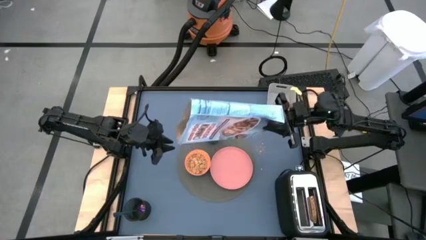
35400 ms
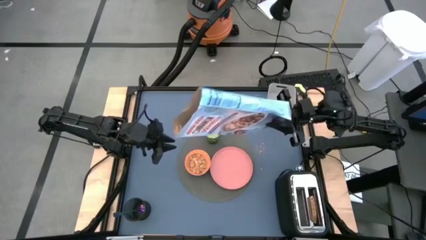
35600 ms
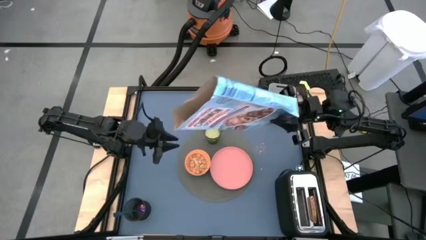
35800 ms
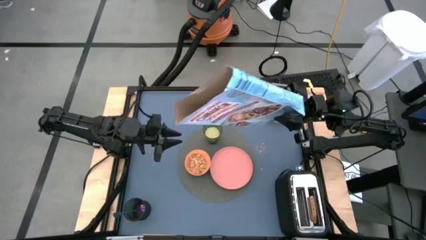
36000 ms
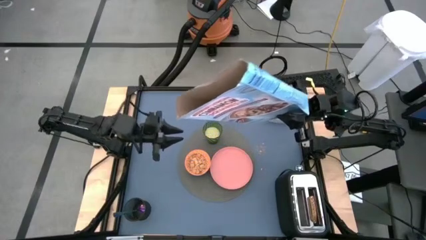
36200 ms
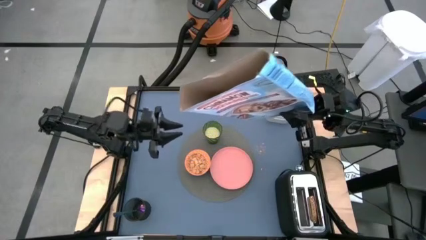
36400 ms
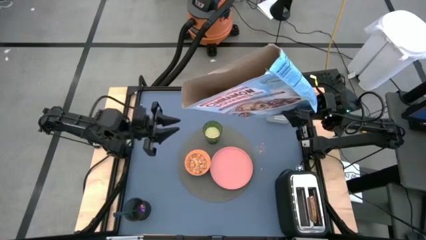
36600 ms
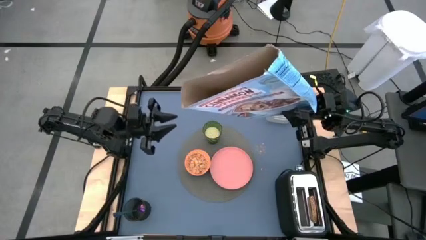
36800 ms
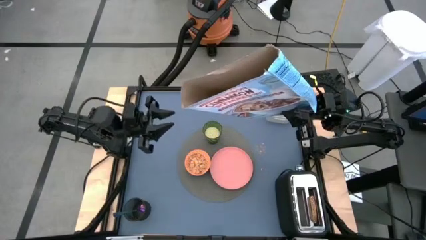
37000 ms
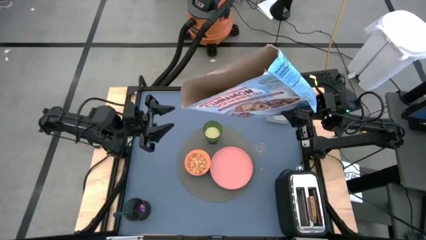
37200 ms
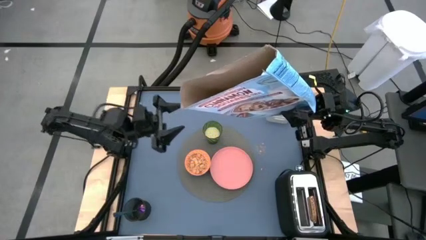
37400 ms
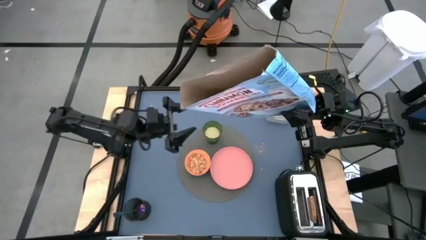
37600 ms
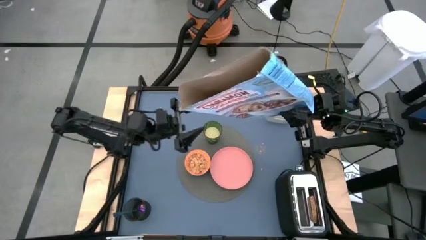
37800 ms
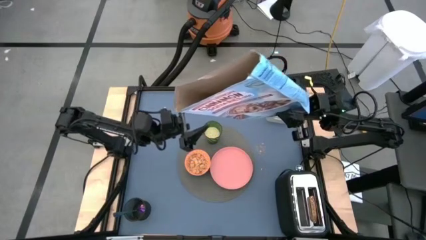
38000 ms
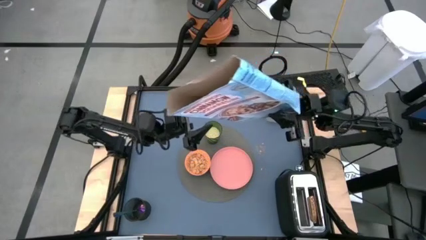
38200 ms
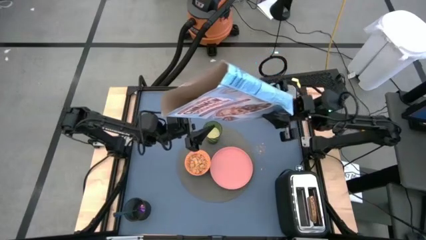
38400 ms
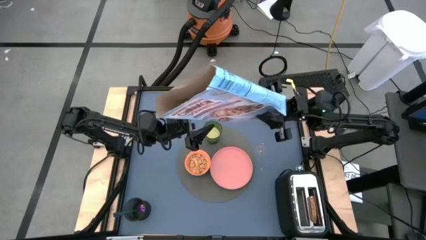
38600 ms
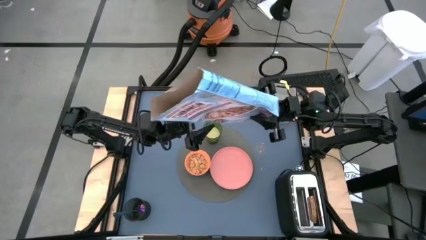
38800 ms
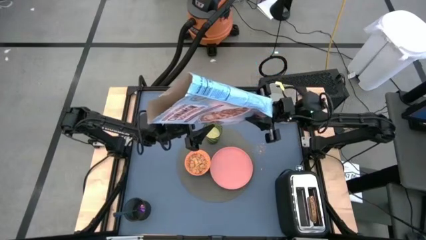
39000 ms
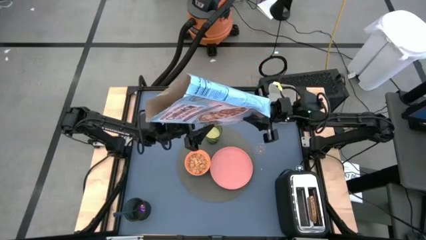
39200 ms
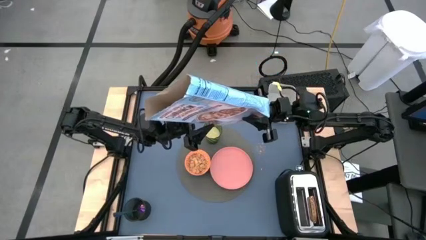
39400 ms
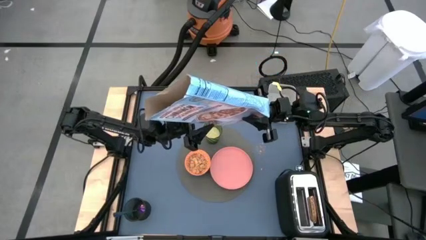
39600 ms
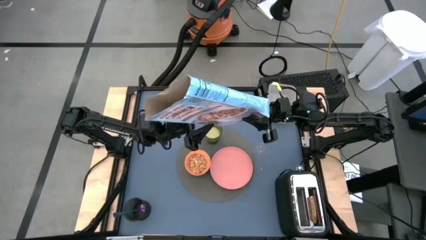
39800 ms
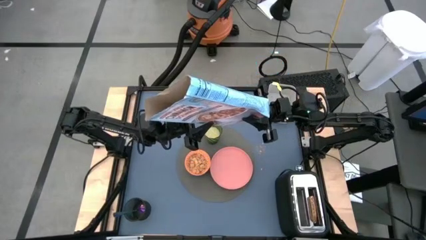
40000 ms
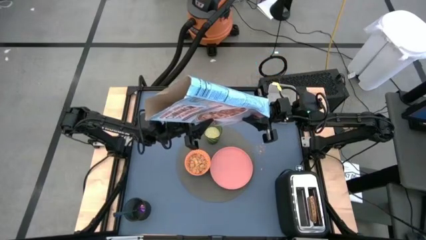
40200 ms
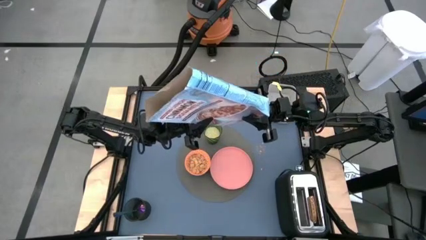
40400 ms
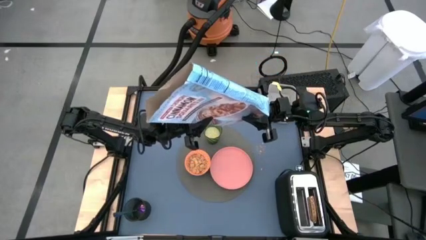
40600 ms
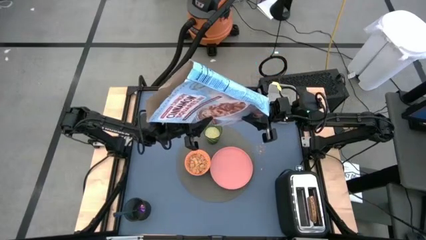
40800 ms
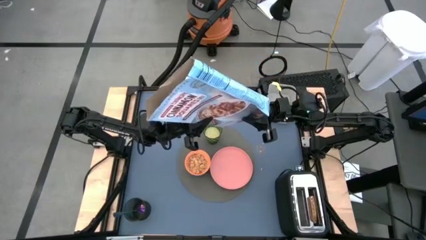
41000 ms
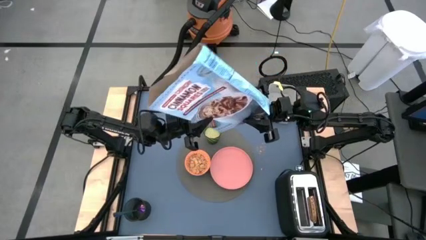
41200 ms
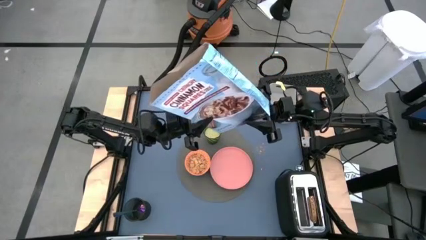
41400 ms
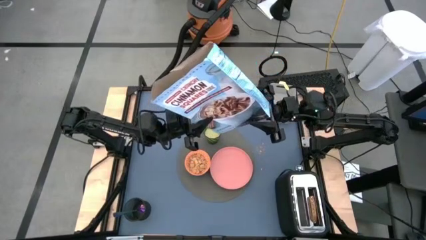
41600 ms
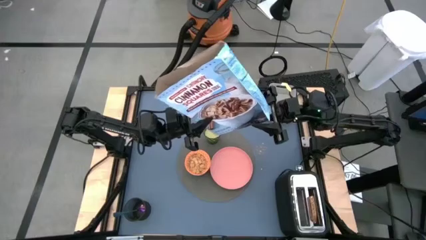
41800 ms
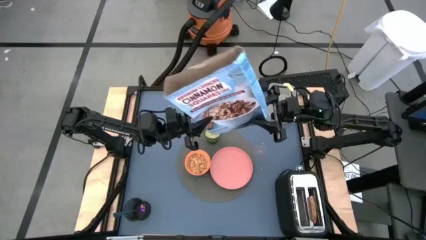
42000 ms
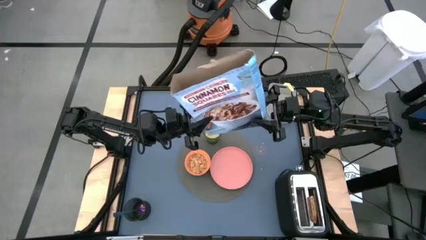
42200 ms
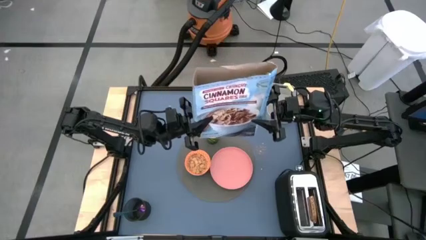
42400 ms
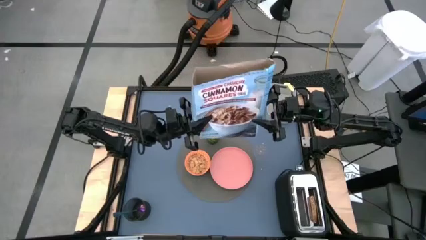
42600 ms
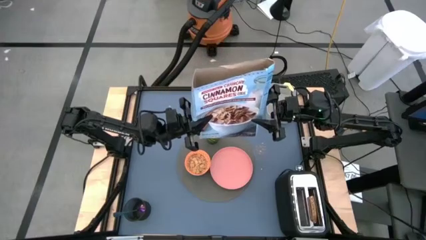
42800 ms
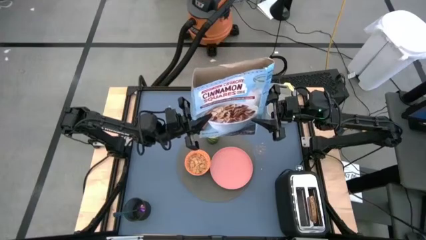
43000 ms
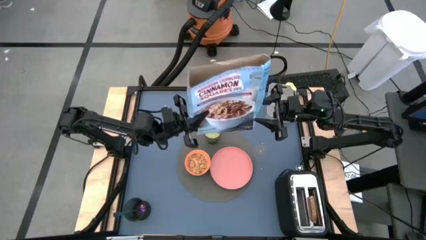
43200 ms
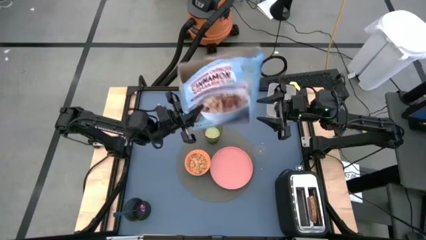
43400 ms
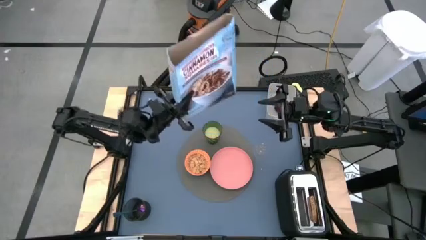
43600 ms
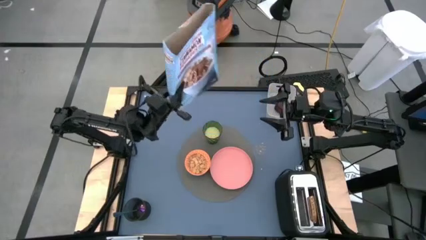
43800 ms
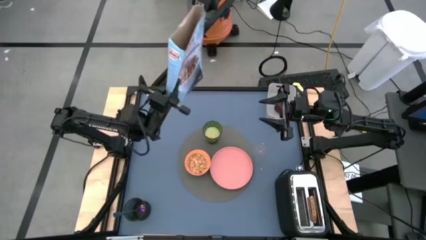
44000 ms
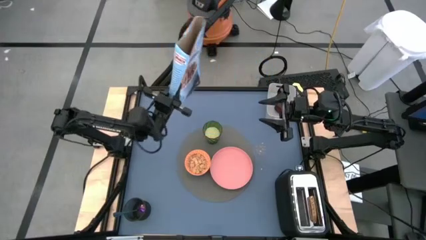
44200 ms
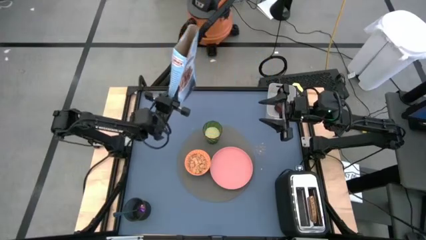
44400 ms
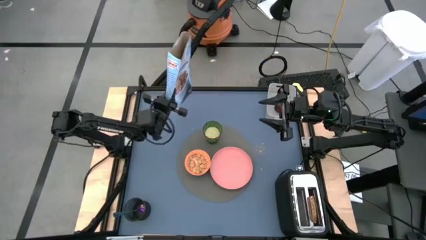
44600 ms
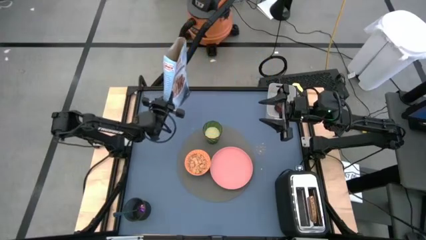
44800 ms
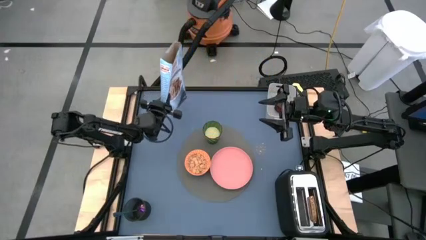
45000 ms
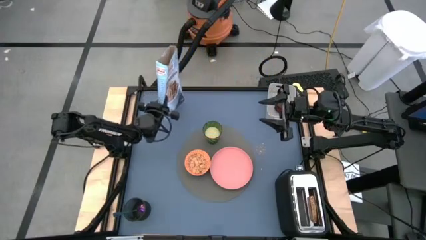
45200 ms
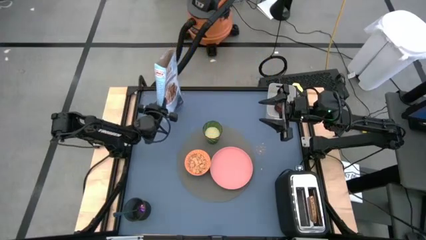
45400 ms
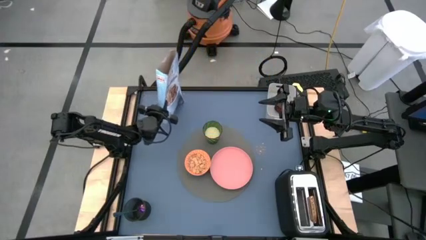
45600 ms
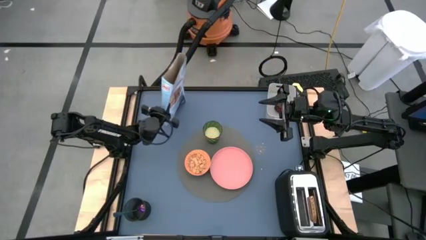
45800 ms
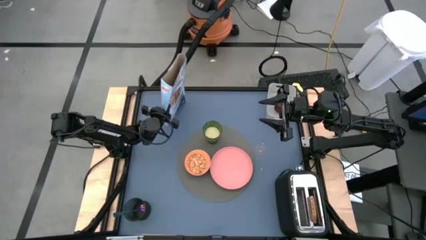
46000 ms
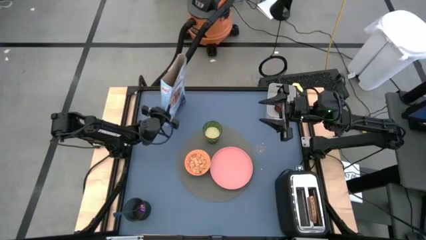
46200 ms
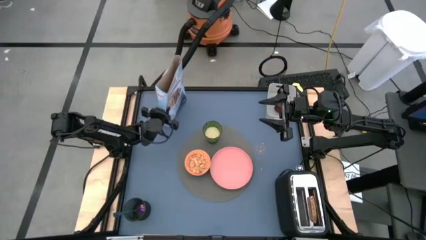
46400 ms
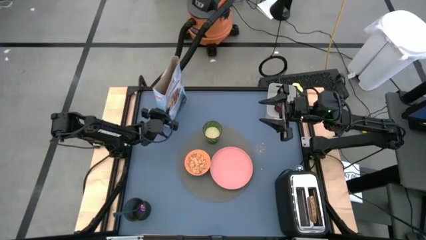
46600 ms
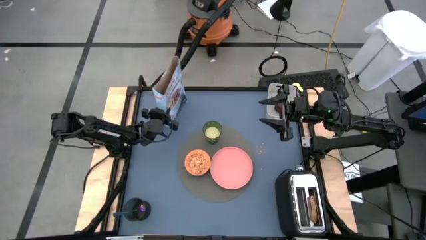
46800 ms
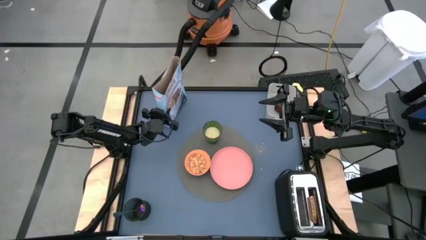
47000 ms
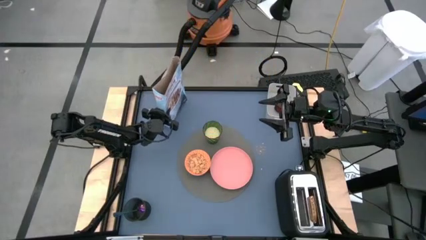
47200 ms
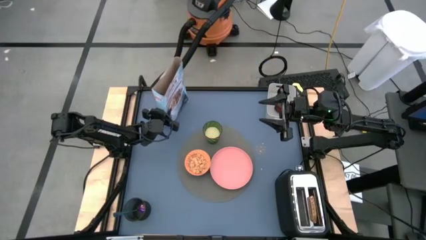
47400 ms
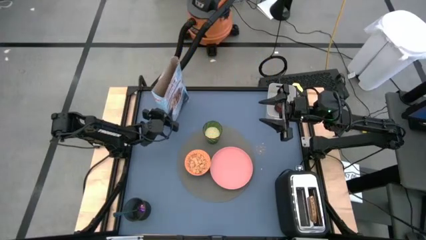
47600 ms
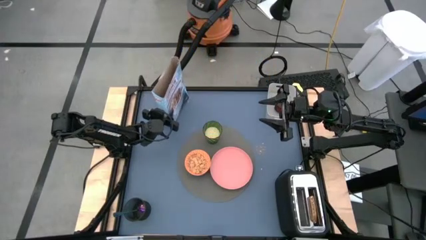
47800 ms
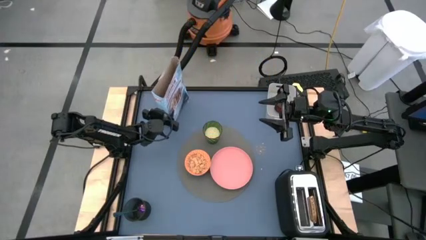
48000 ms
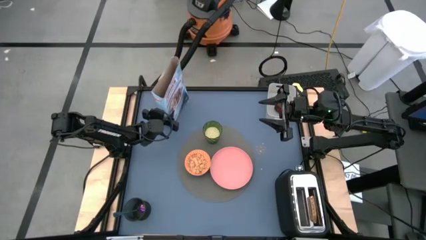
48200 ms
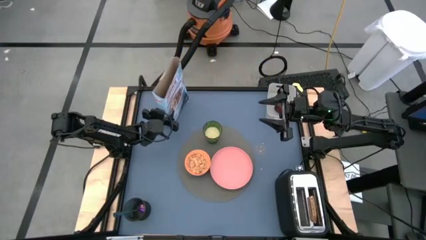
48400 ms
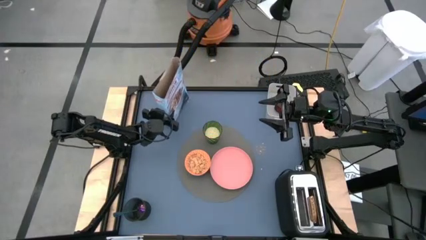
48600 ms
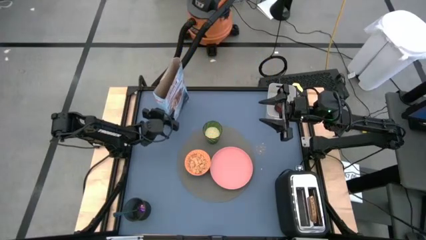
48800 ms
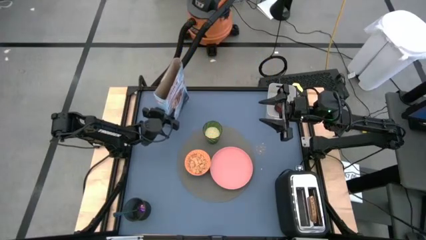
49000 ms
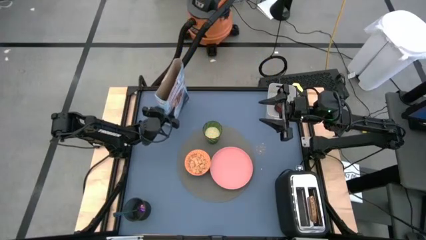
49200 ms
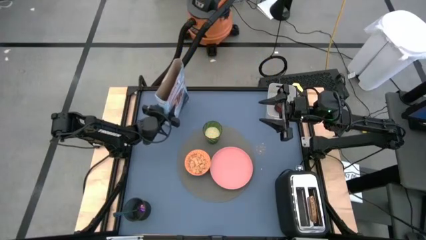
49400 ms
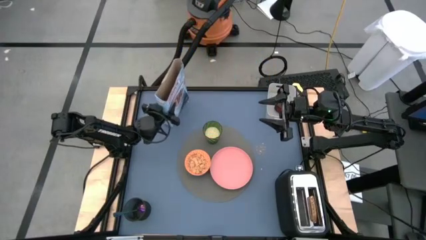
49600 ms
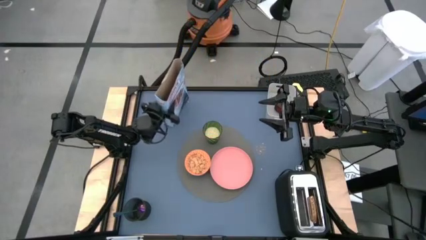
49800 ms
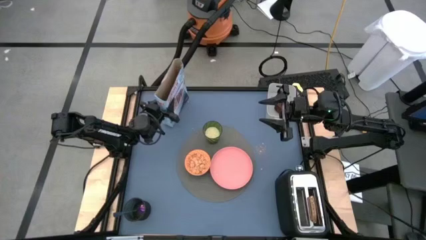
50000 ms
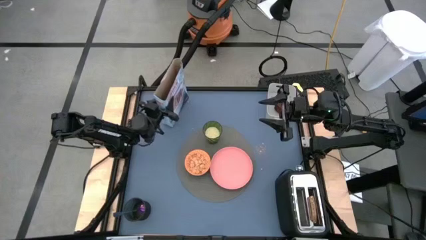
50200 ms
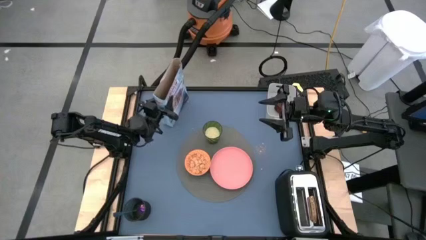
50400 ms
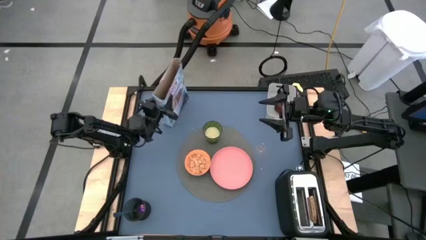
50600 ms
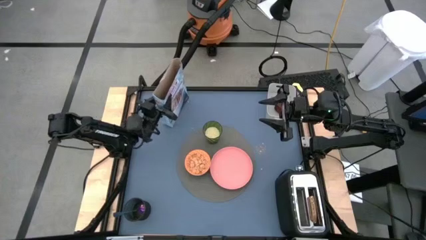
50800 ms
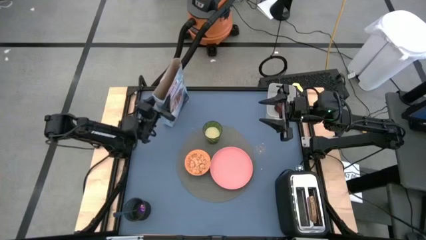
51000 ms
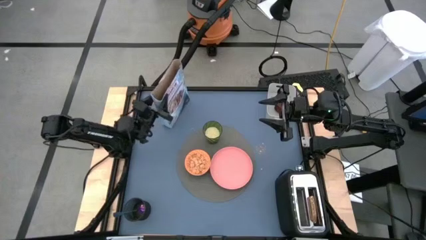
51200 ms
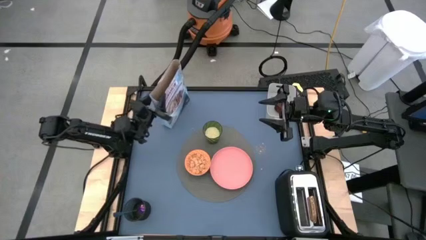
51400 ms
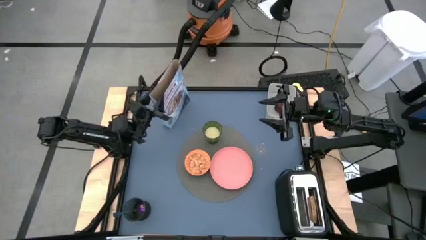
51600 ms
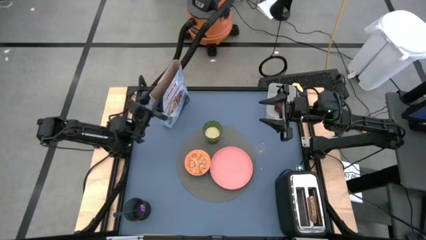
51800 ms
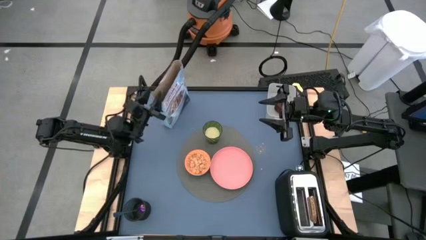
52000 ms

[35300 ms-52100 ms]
Task: Arrange a breakfast setting
Pour the cereal from the blue cereal box into the orange bowl
